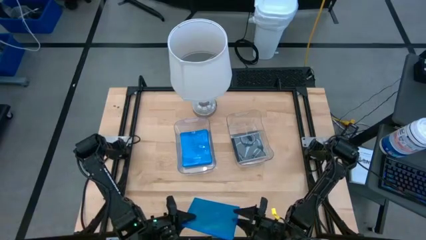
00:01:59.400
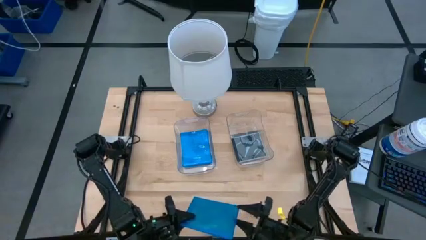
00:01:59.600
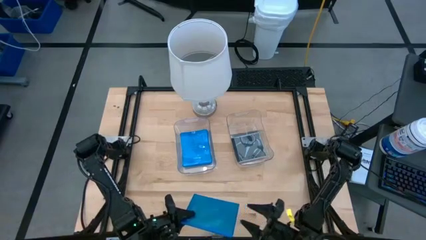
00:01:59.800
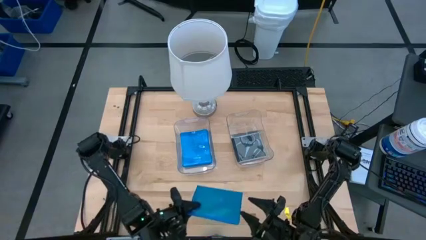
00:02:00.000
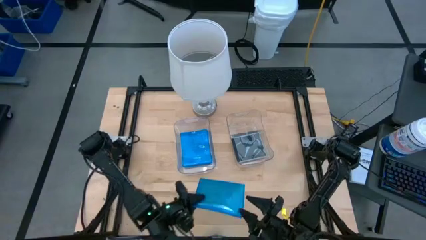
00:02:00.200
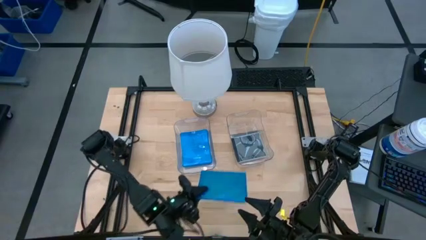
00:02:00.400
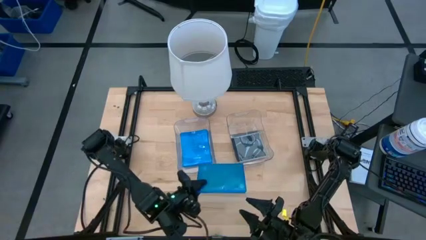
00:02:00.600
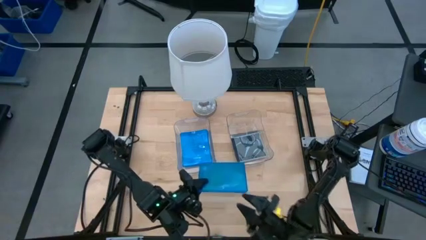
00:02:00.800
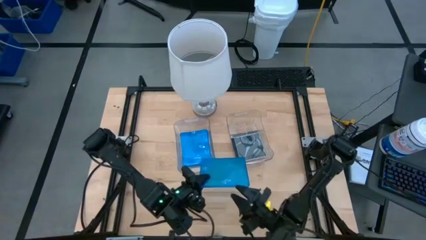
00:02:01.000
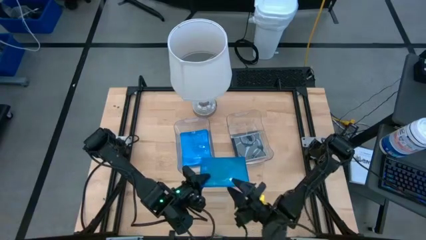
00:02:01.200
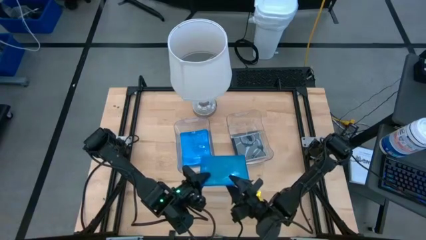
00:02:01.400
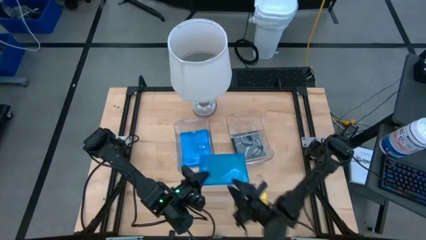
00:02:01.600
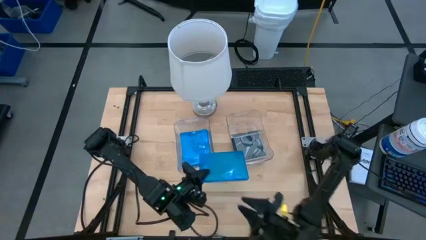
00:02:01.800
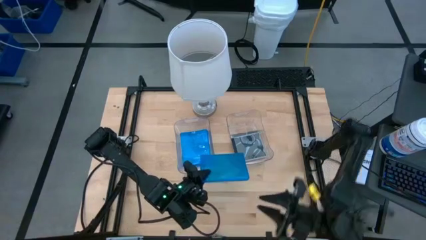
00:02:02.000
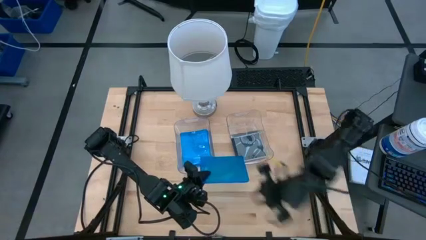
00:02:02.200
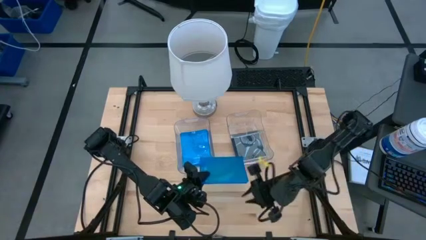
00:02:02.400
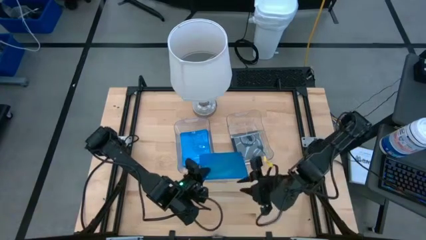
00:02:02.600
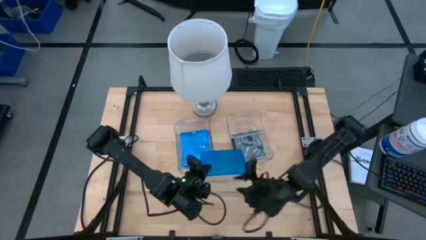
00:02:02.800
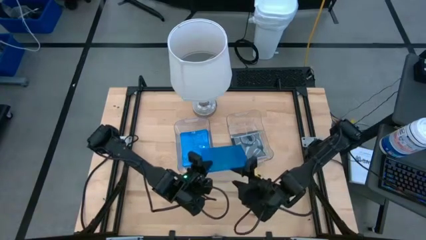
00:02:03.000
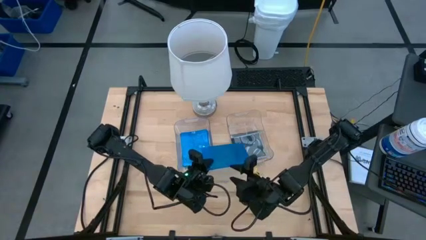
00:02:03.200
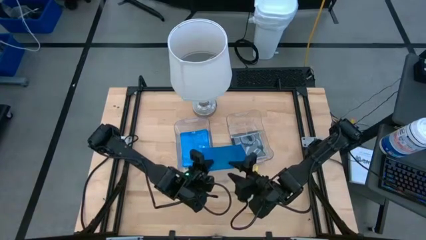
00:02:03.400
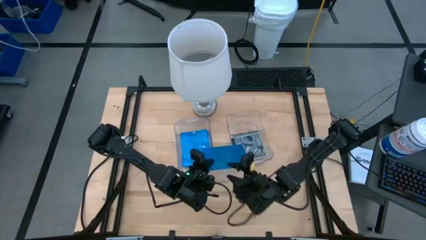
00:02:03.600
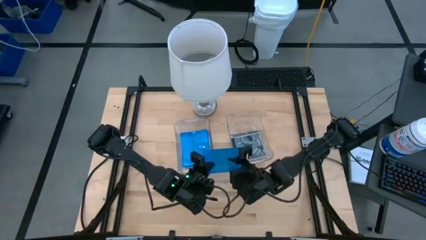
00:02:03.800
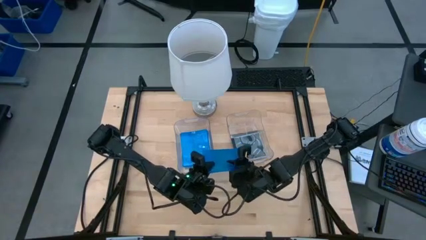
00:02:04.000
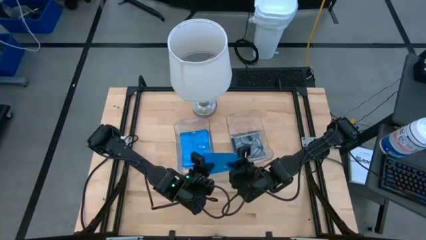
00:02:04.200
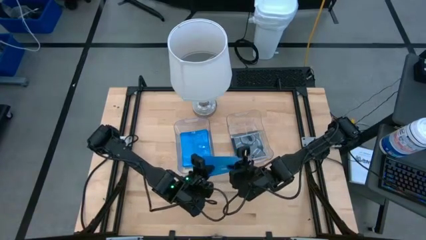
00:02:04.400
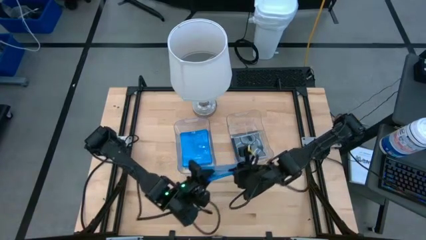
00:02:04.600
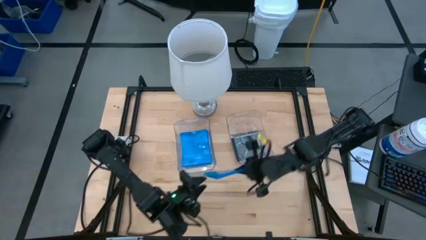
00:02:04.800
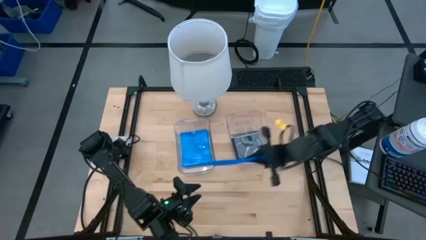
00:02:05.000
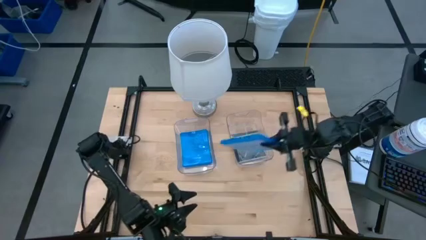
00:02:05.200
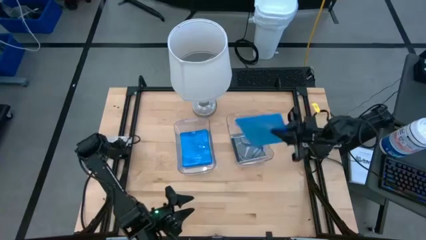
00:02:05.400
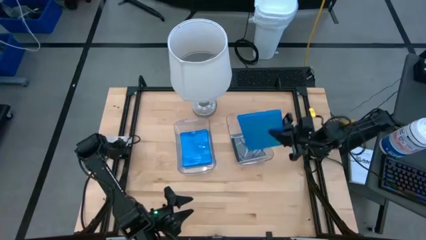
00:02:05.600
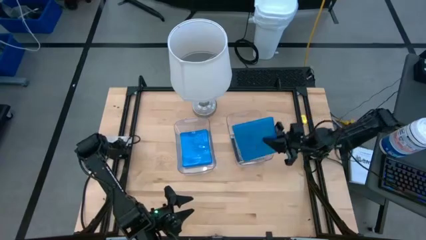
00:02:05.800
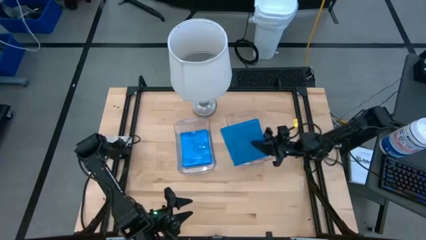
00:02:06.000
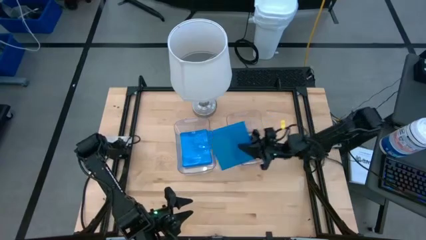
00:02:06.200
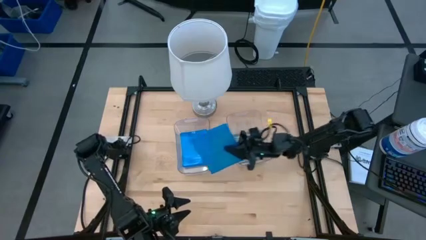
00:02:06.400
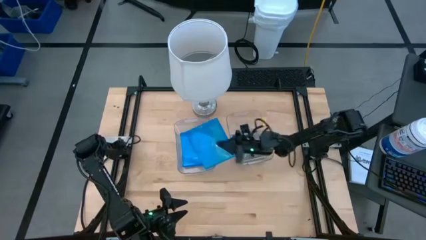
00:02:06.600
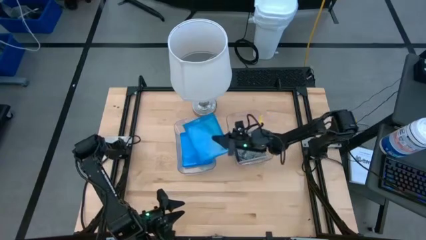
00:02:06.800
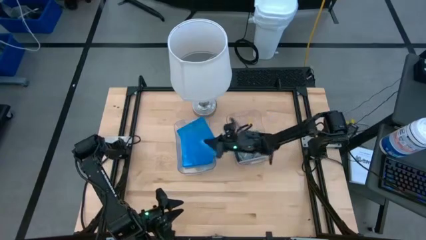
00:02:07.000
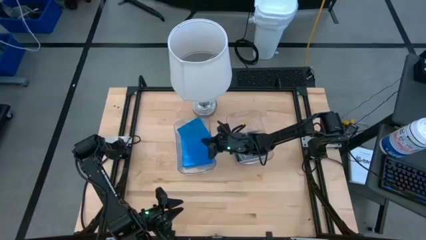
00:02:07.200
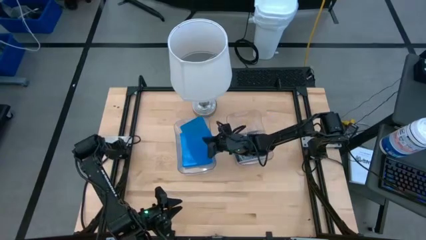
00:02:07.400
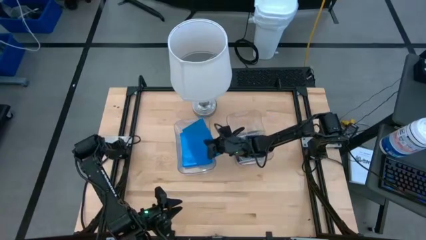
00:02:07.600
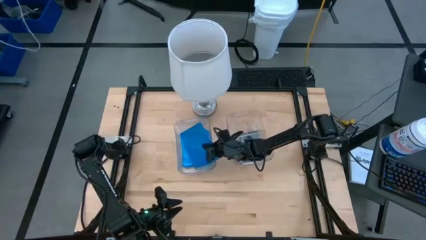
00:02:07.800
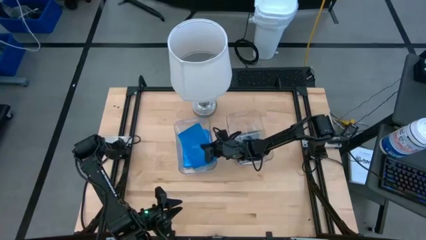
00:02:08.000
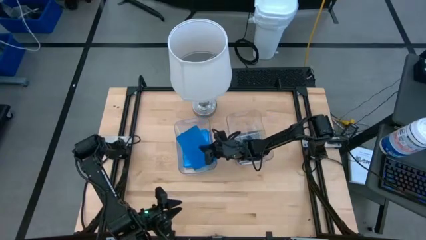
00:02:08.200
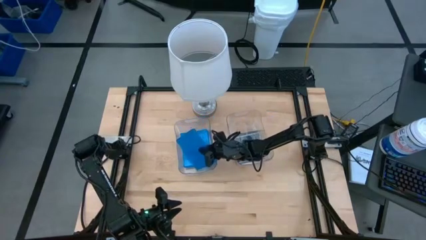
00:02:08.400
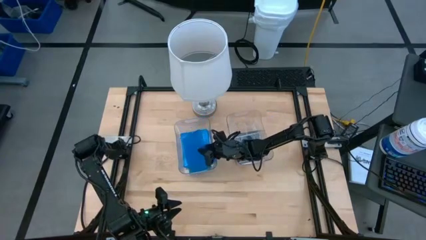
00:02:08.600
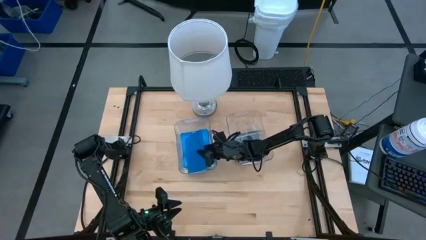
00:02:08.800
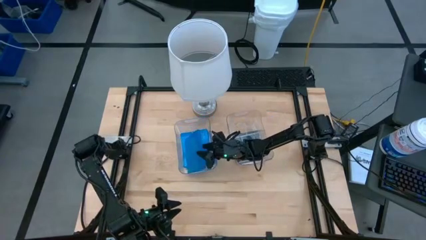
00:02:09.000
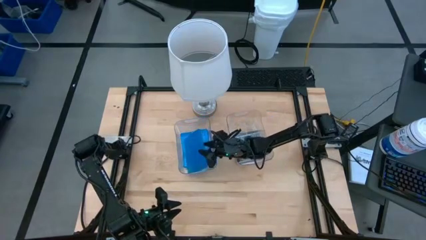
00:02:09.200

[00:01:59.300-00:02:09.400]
Task: Pick & place jewel cases by type
Put the blue CD case into the left transparent bin

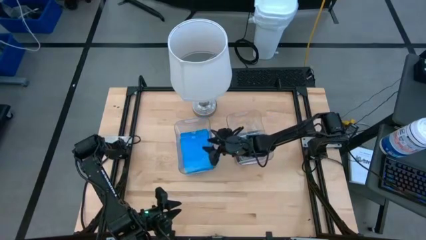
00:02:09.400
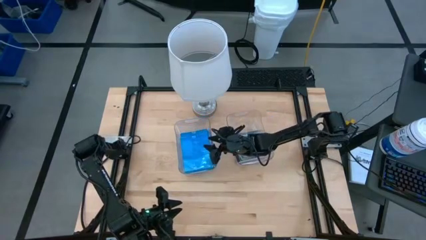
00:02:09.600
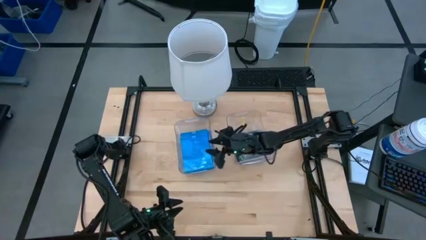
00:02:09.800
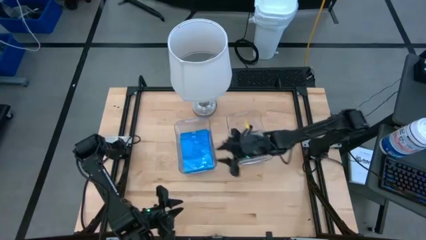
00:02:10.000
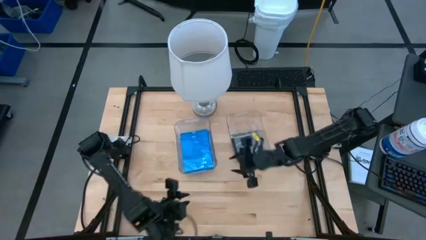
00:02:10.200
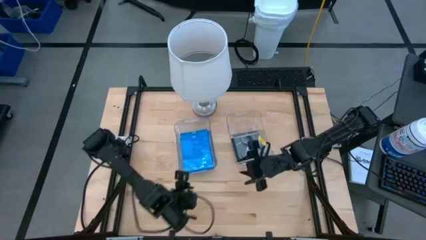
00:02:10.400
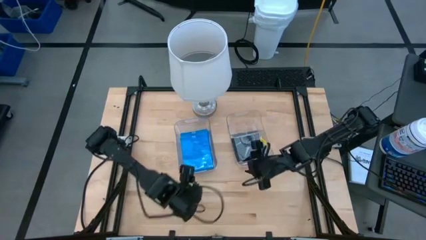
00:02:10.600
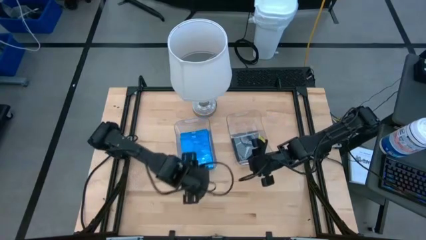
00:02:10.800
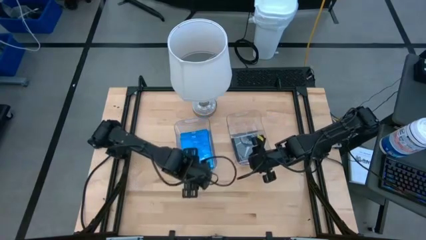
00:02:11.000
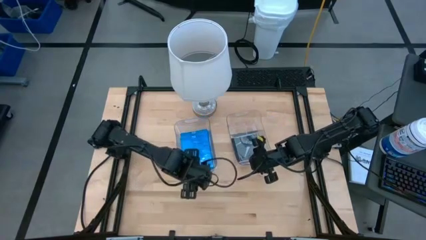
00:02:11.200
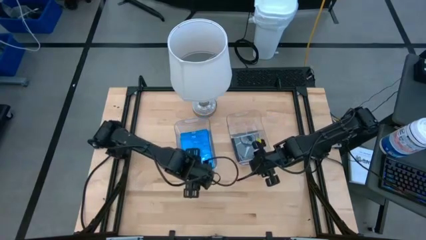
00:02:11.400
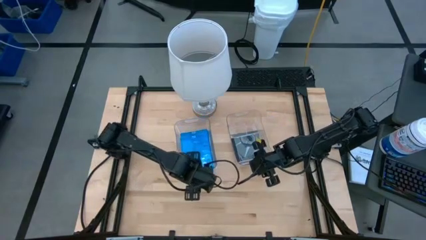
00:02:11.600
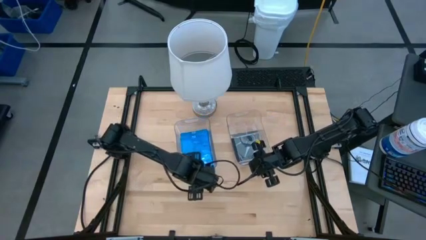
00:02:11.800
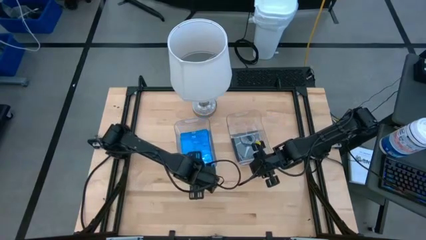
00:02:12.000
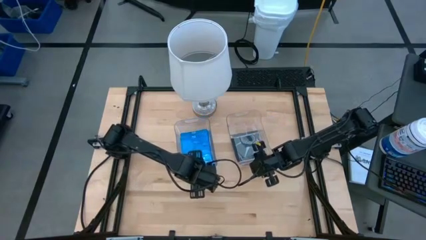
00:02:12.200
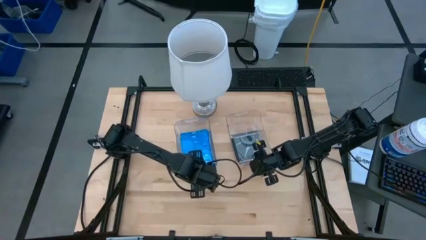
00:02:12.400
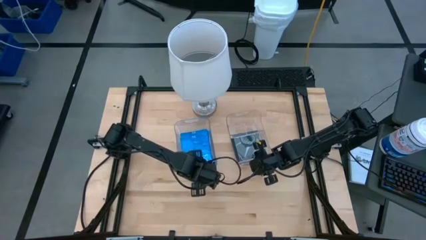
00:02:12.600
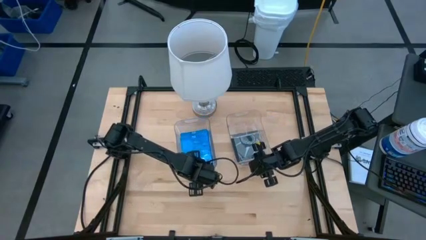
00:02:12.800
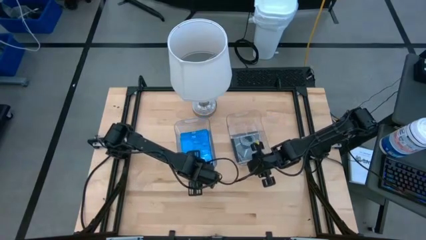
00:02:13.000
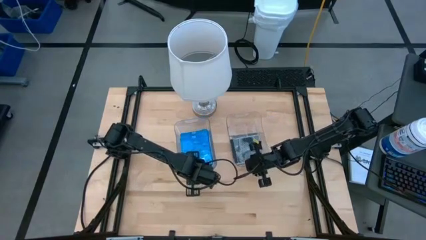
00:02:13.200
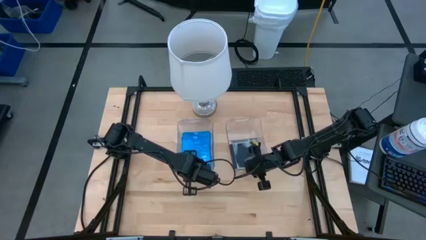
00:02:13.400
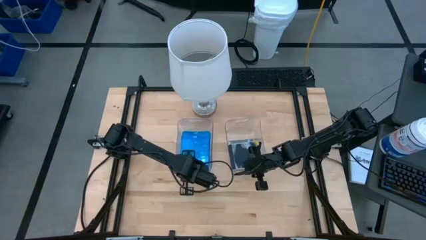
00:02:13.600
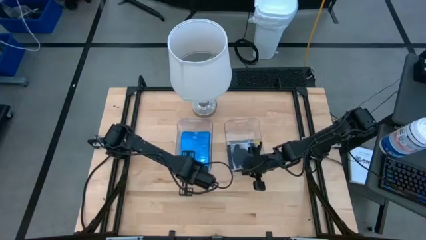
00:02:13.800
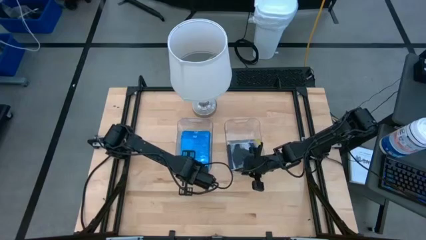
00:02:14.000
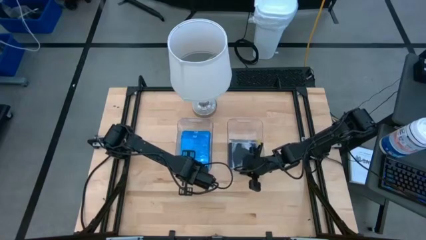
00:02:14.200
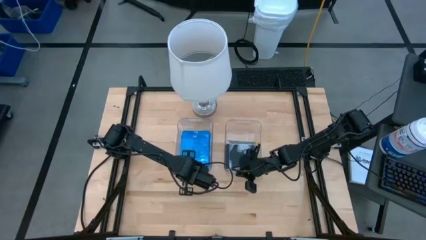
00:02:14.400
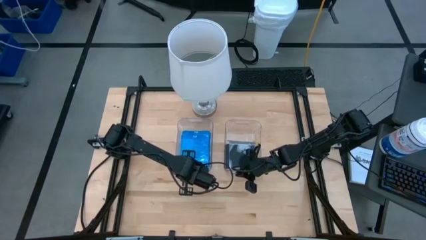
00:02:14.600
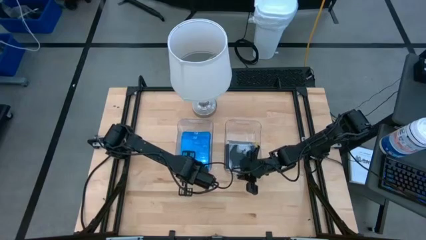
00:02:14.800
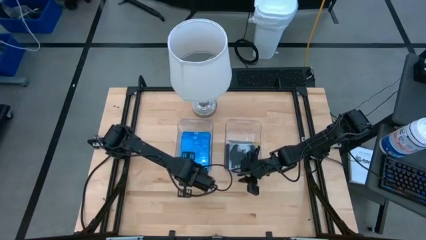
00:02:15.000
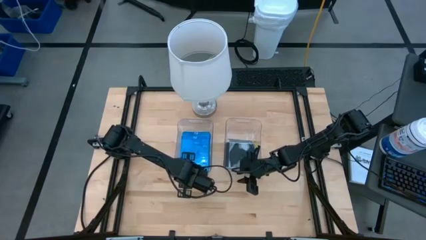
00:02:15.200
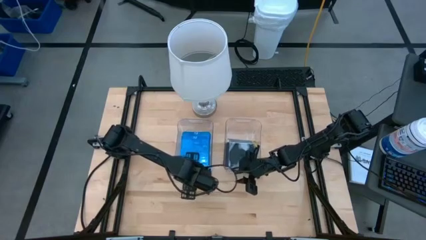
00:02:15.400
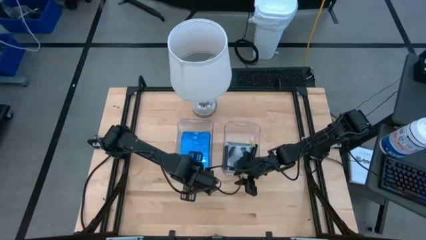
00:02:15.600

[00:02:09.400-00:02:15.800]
Adjust the transparent bins on the table
